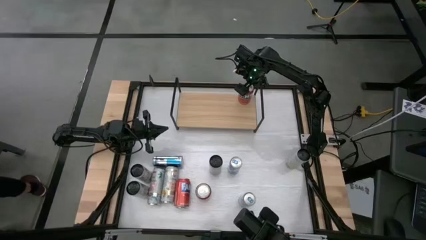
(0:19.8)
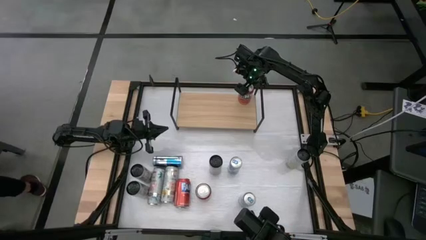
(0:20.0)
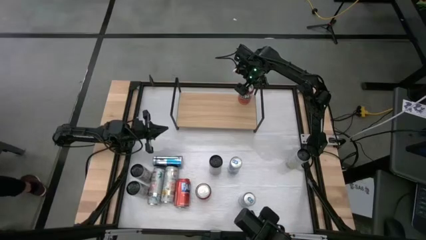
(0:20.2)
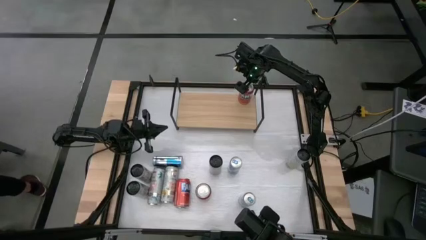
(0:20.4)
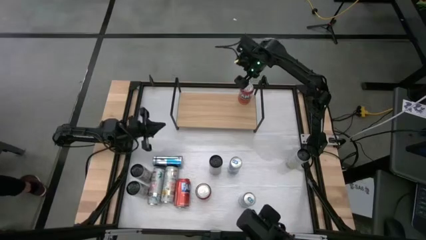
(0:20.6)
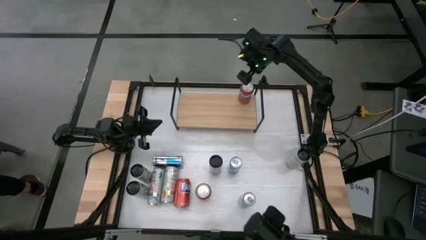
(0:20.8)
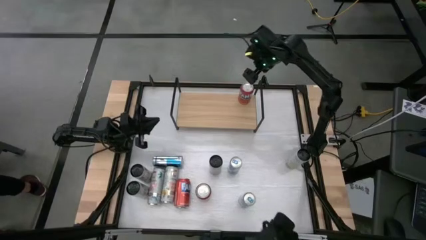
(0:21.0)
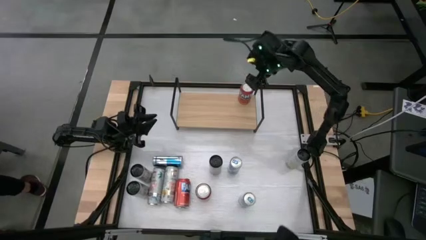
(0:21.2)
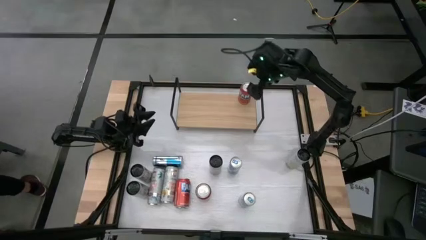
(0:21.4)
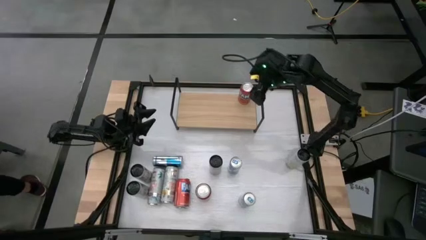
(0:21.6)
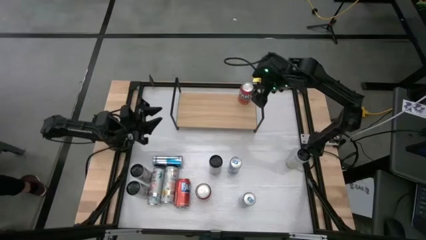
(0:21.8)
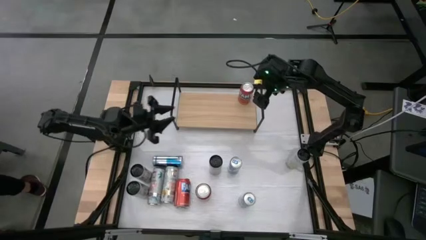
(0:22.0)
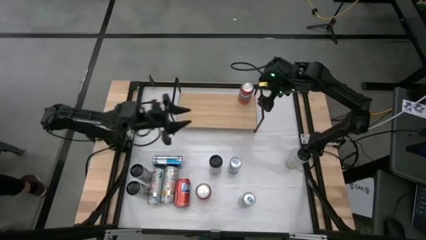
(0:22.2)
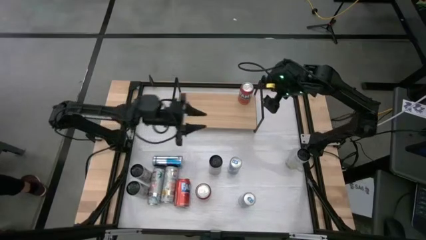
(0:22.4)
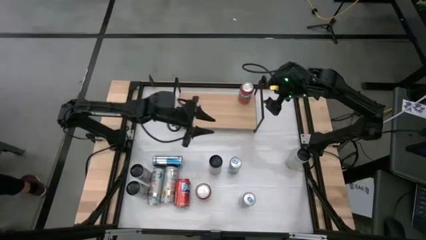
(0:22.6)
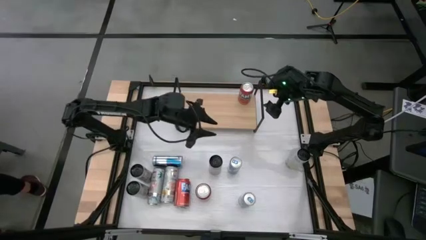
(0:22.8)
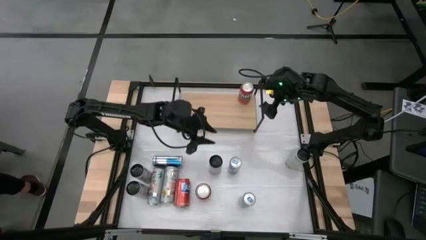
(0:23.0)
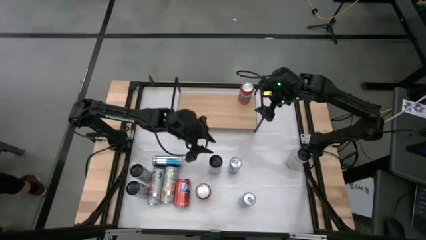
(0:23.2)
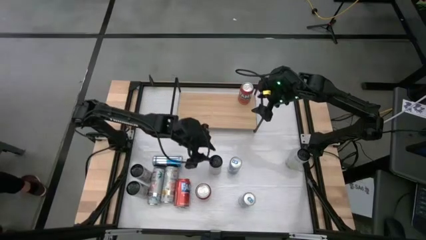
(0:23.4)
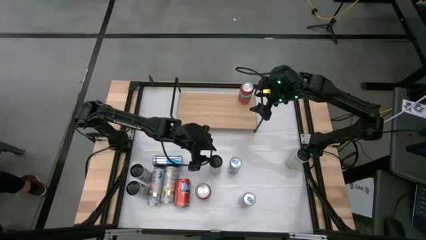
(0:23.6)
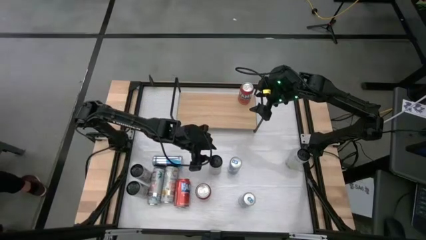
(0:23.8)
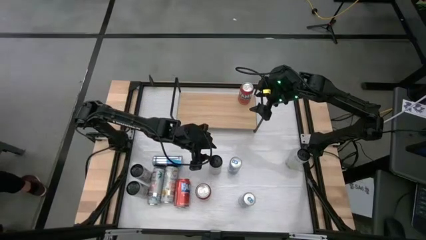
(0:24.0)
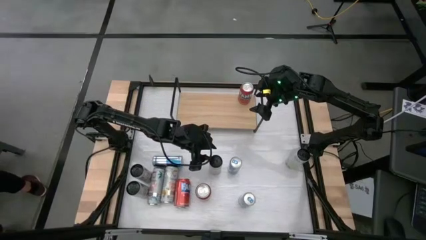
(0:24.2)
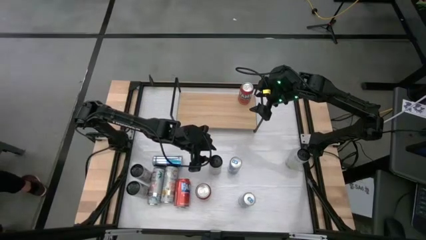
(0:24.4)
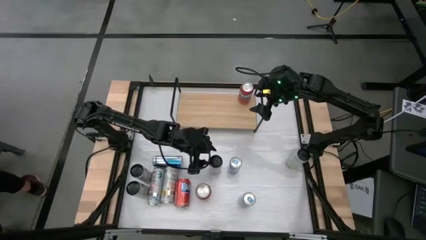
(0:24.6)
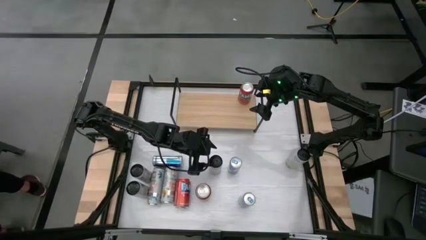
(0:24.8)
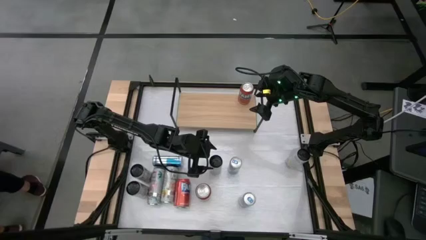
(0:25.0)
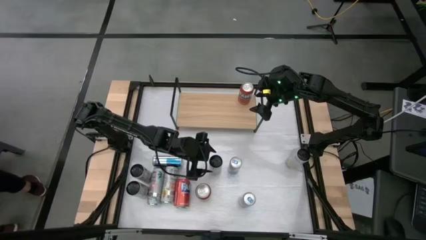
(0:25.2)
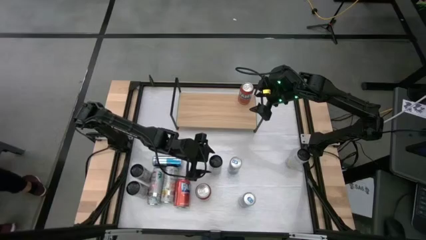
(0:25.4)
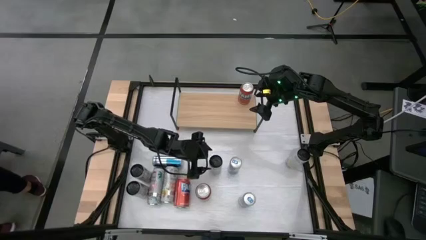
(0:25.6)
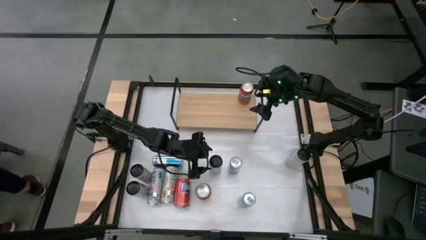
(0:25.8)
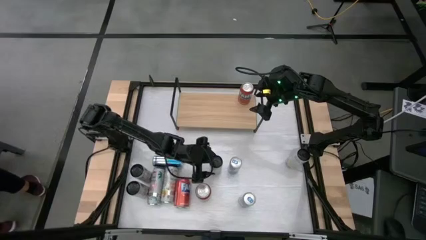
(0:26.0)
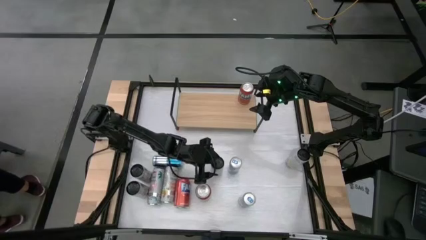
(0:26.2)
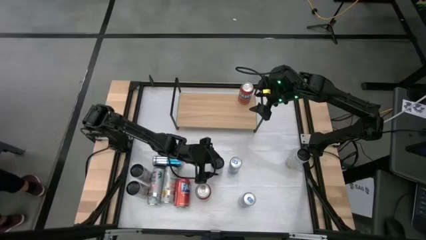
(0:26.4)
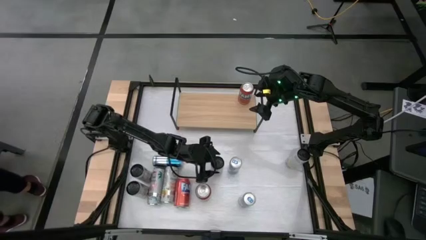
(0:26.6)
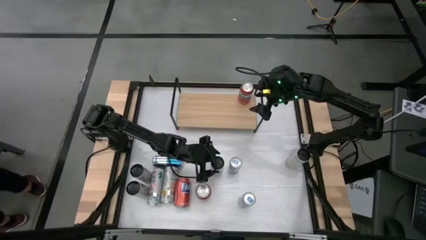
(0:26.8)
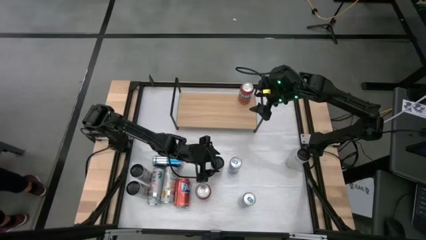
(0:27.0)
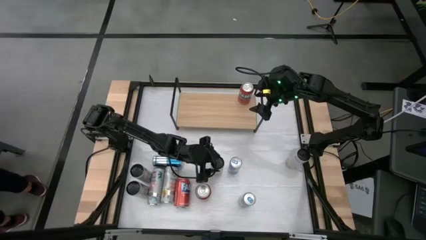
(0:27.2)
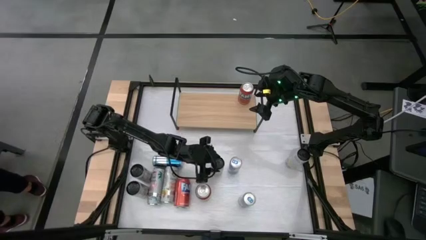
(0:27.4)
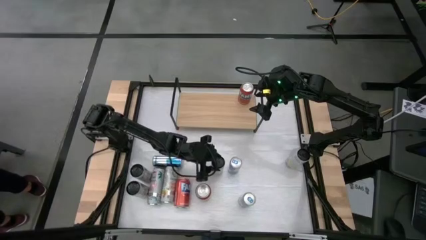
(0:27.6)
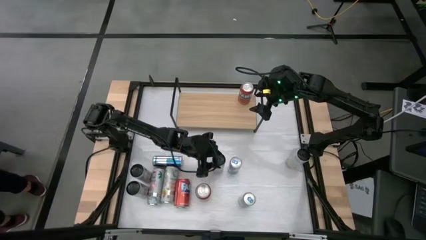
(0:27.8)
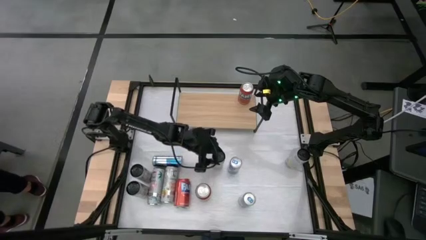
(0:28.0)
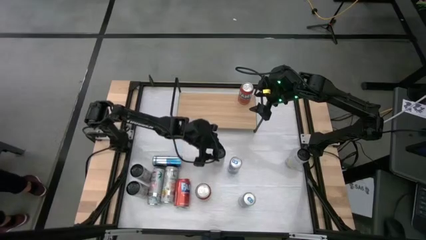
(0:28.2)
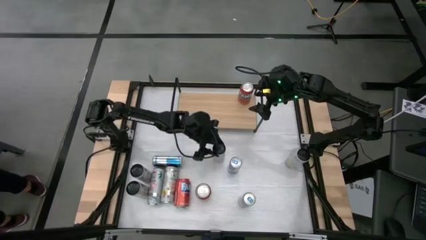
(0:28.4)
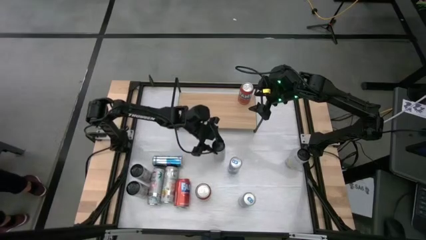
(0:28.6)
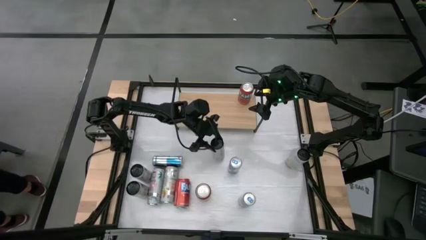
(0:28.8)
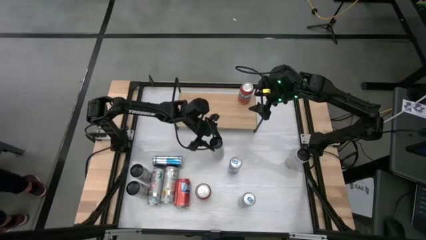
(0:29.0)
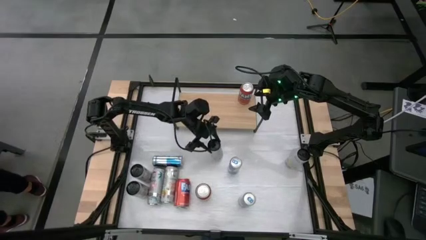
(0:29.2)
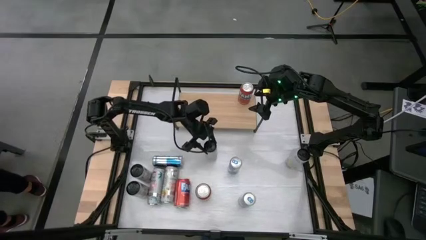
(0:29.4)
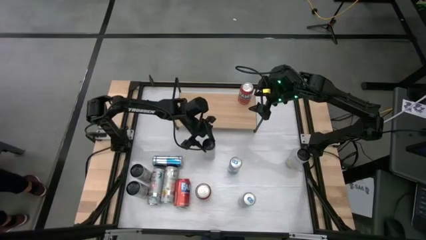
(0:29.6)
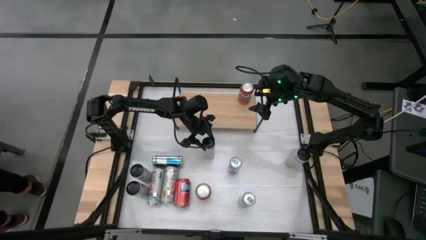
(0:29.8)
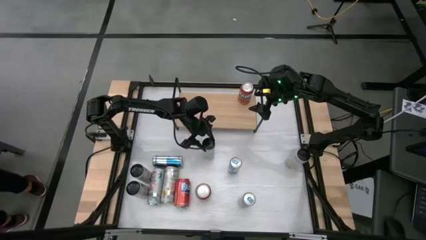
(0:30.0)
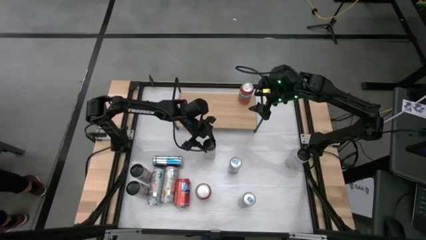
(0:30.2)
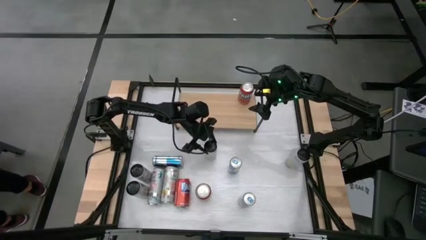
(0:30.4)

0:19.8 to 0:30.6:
Task: Place canned beverage on shelf
Put the top left white yellow soda can on the shelf
